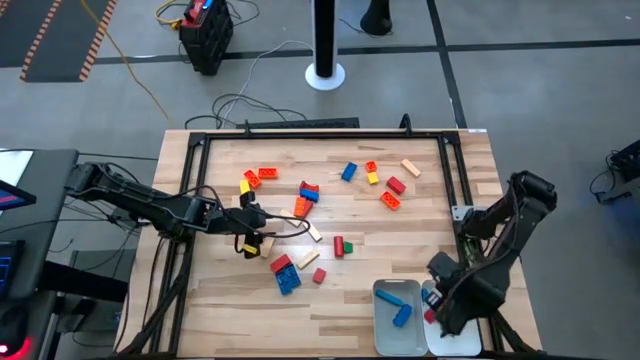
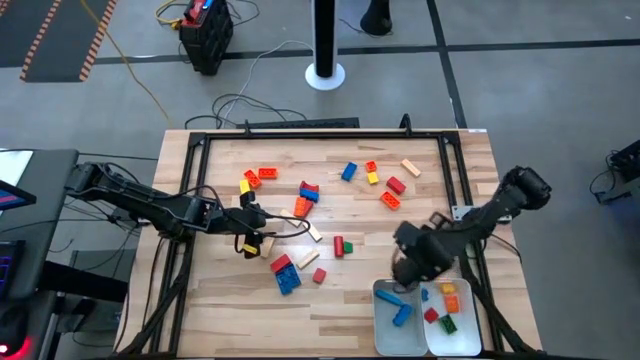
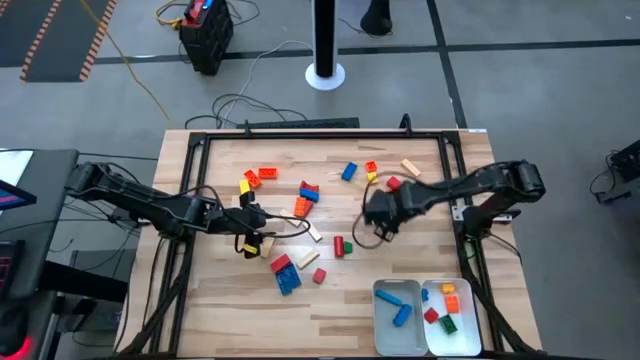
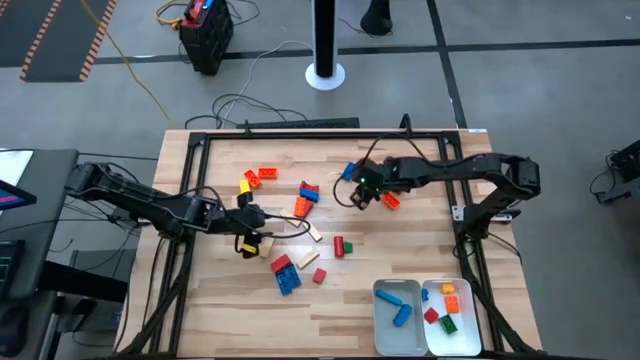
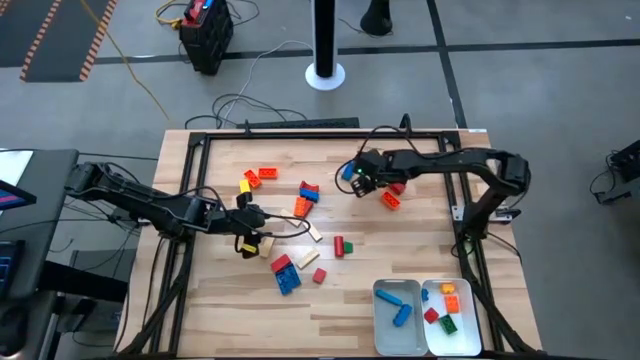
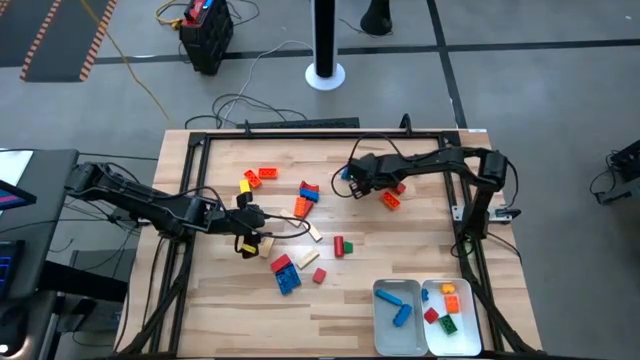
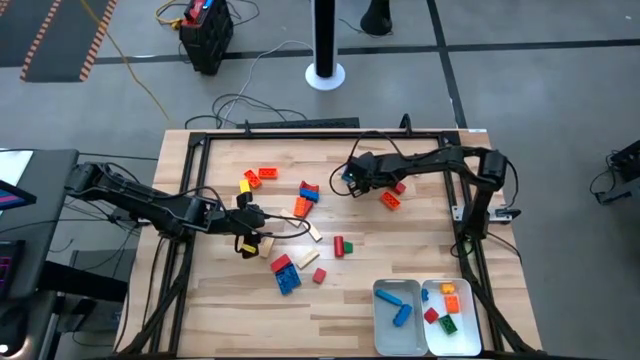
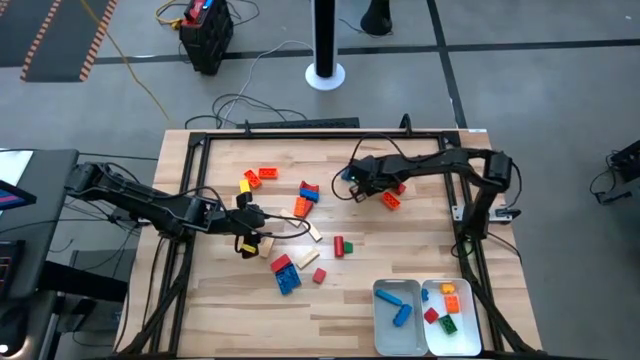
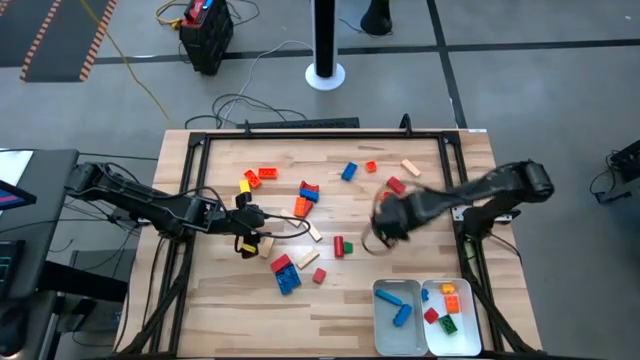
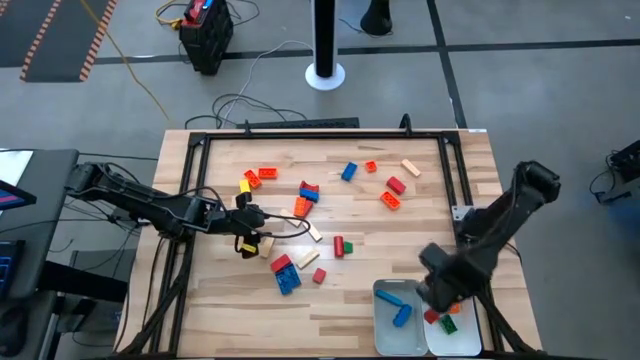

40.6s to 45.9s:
Task: Sort blocks by size
Put the small yellow wooden block into the white bin

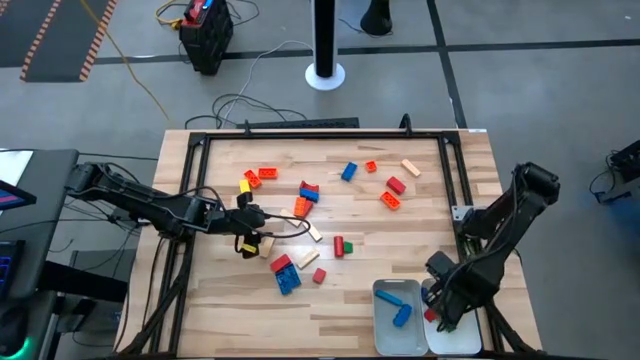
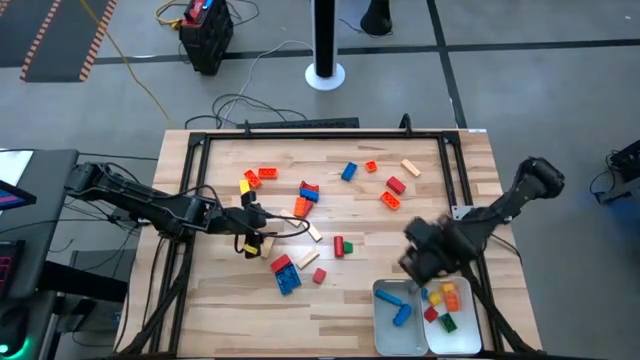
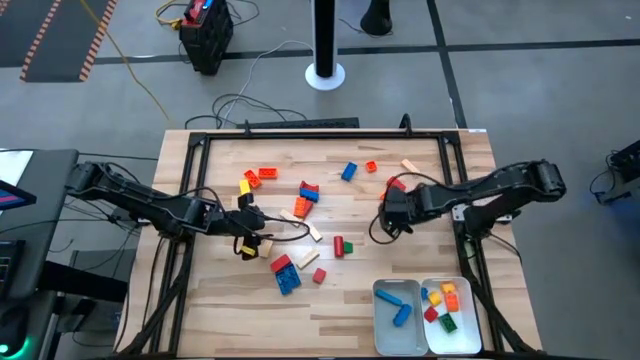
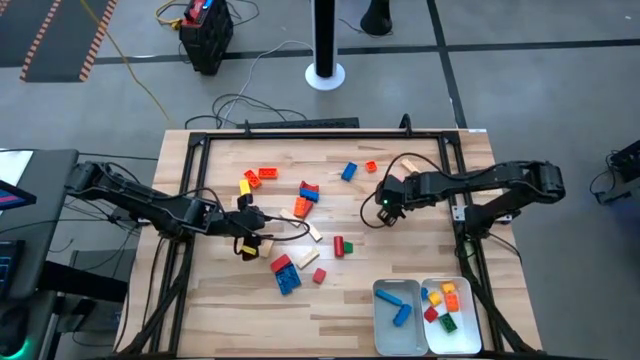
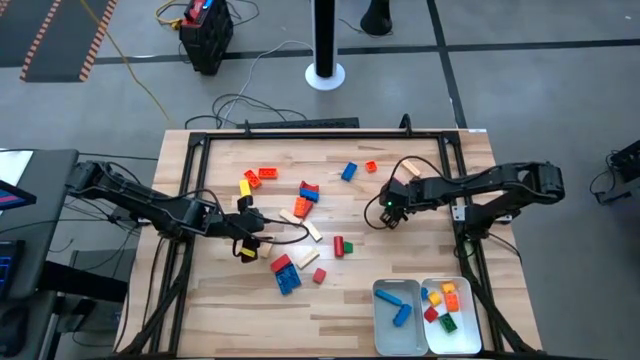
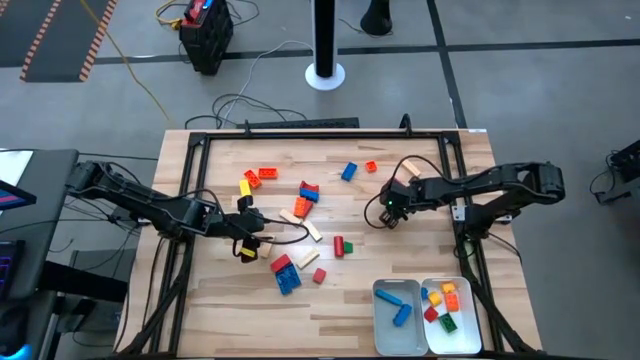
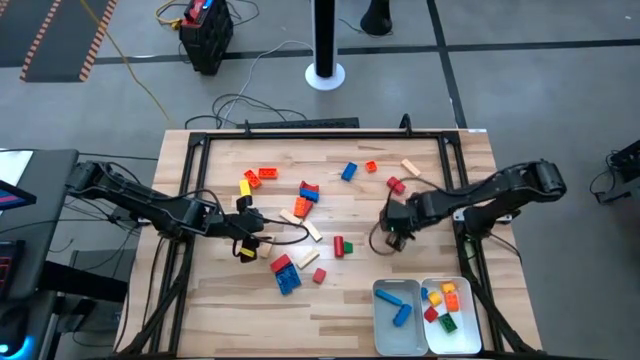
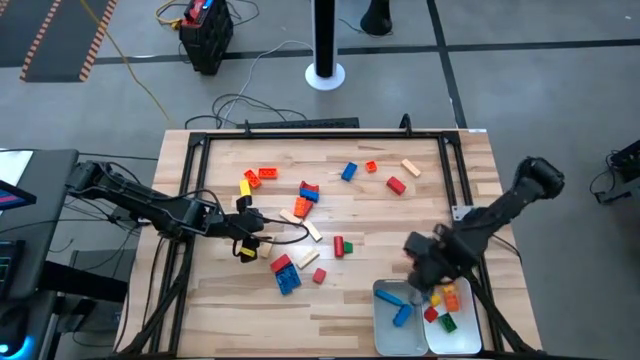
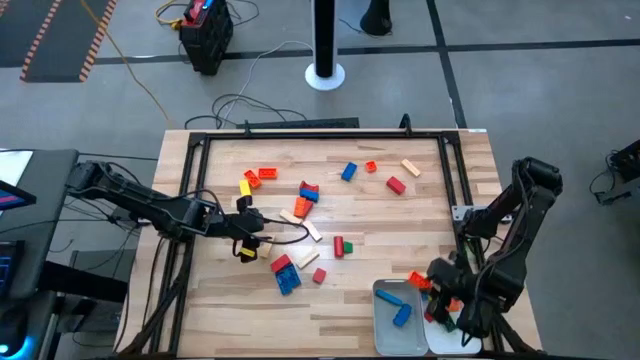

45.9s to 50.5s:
Put the large orange game piece into the gray bin

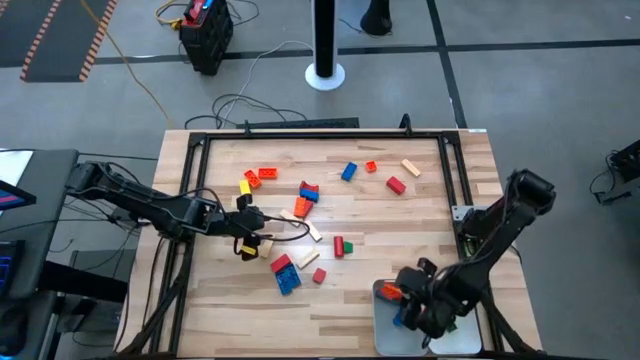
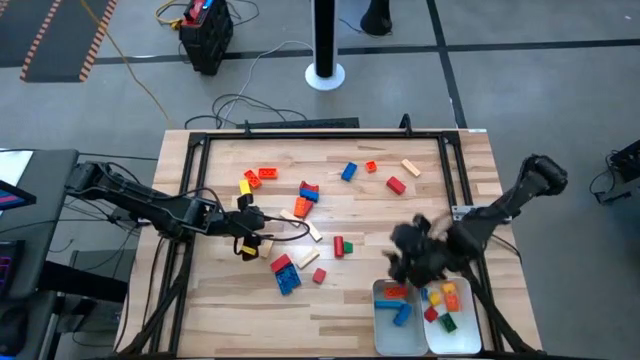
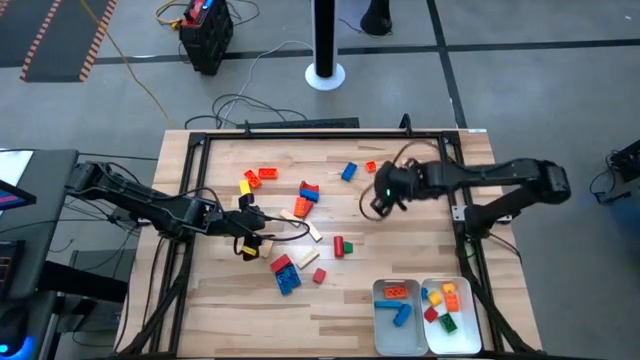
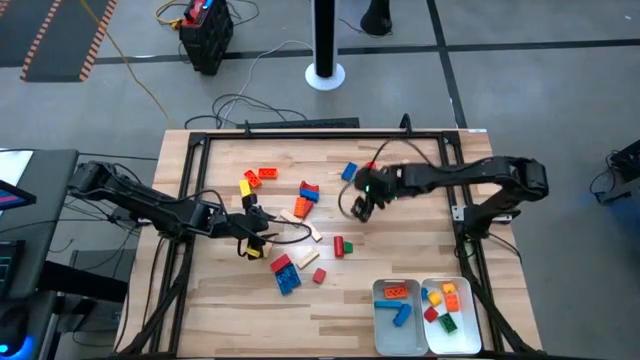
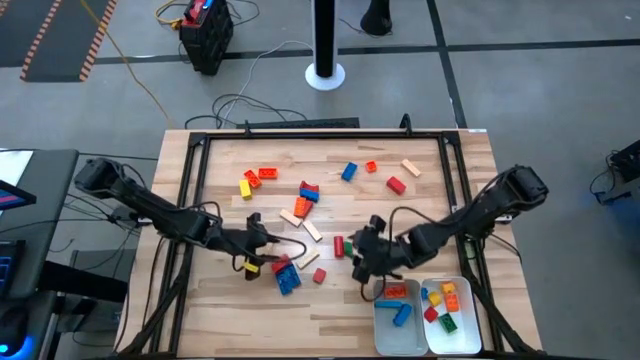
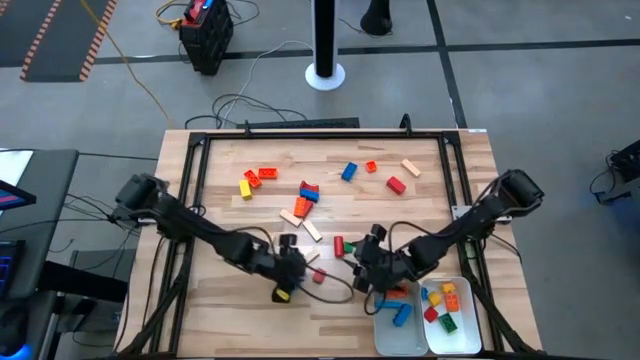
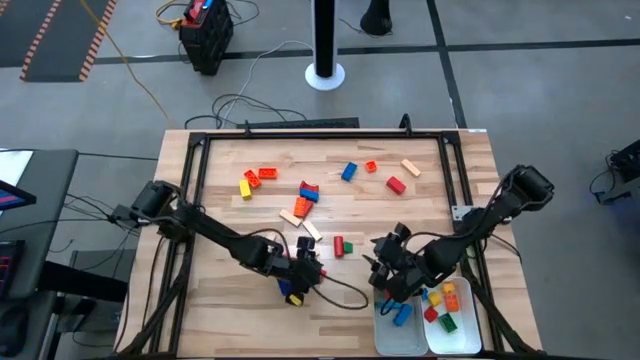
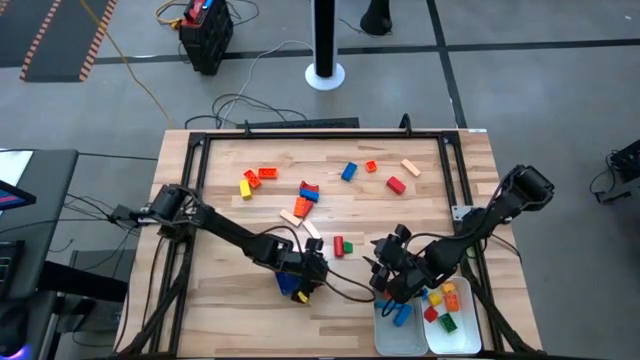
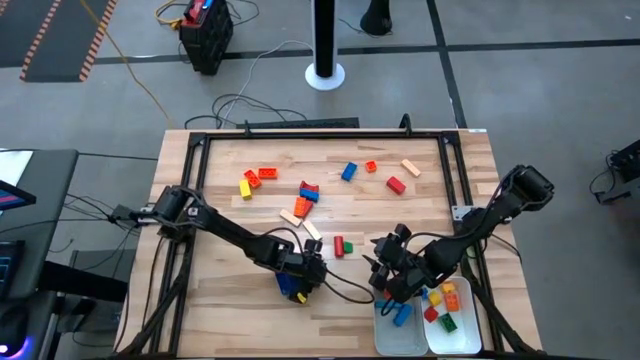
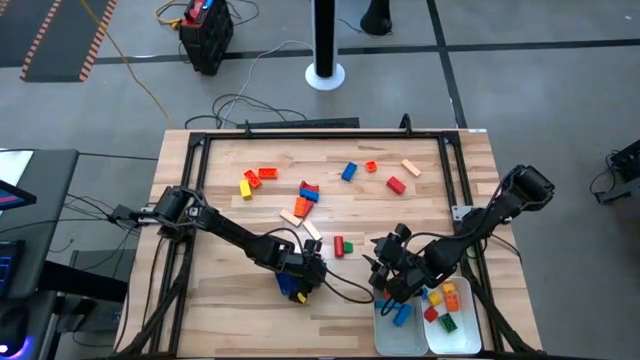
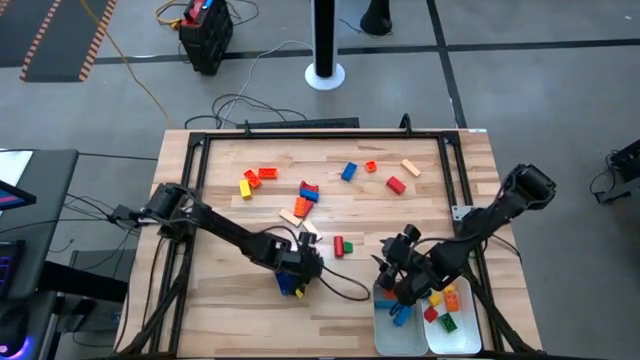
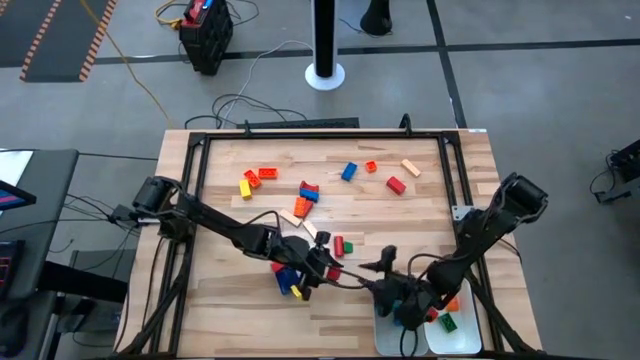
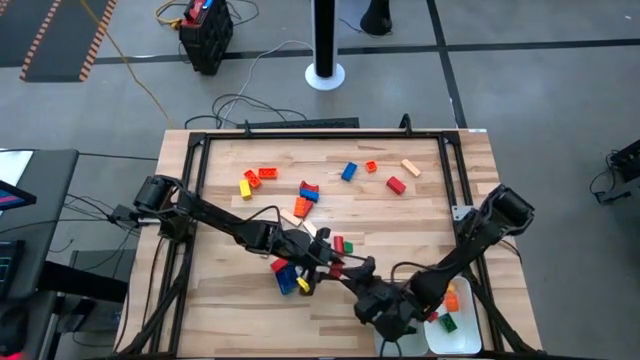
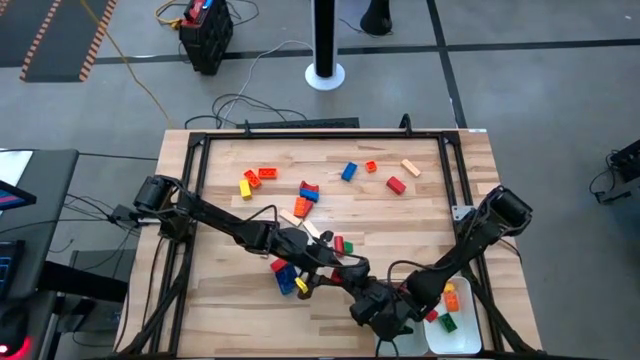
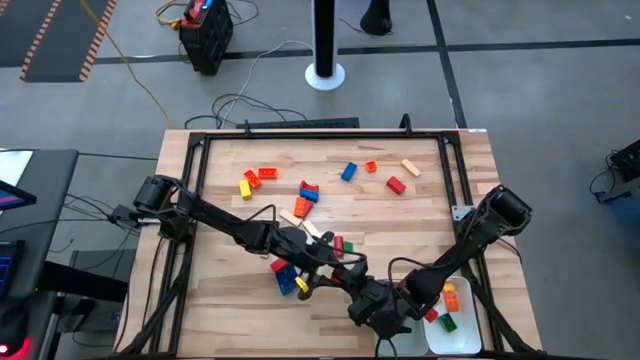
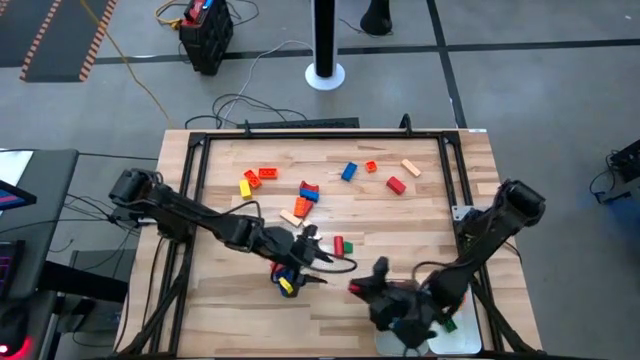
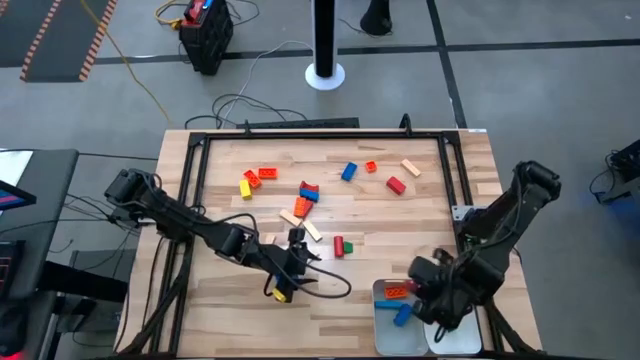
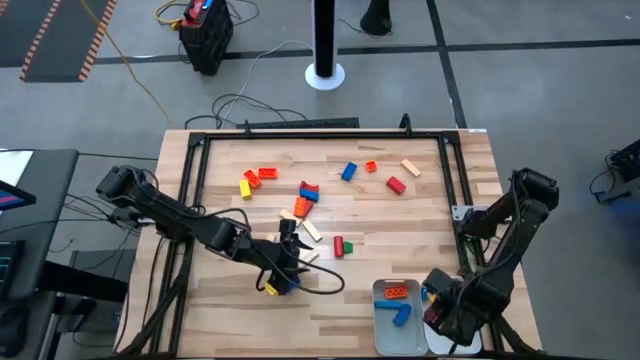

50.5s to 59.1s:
Put the small red wooden block into the white bin

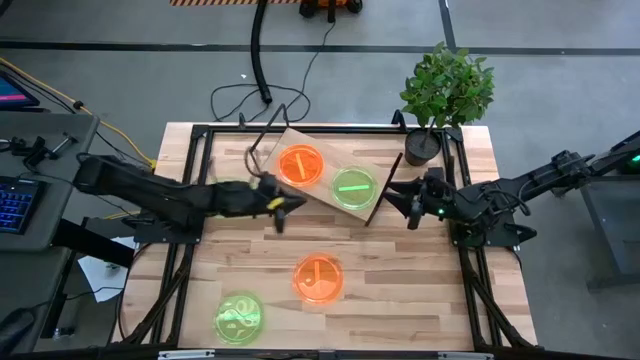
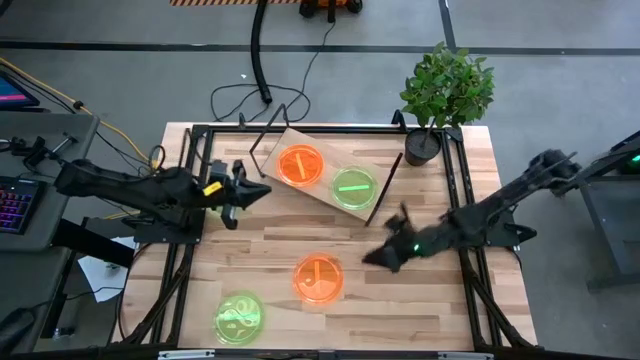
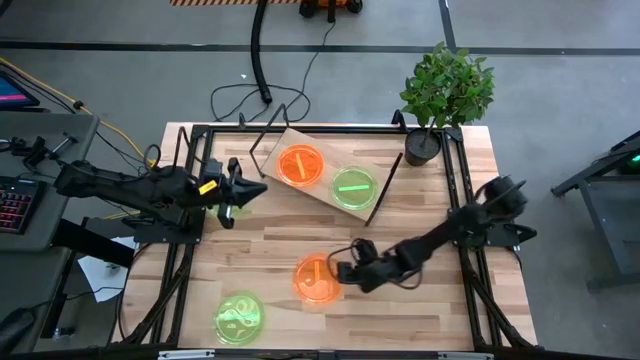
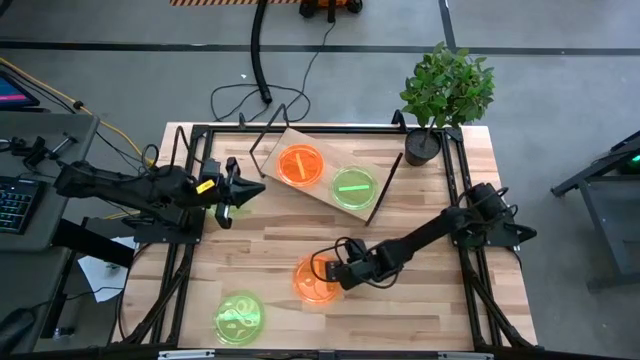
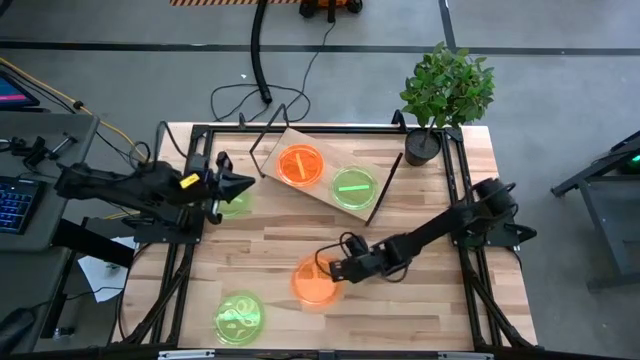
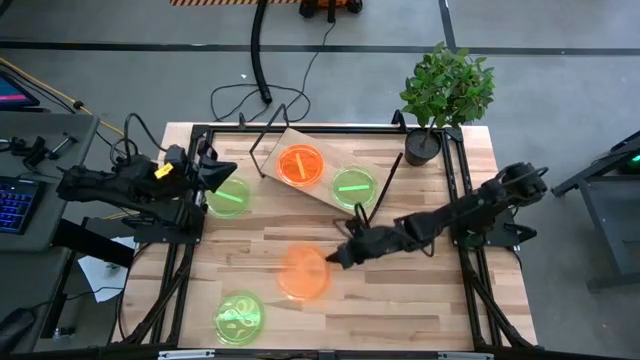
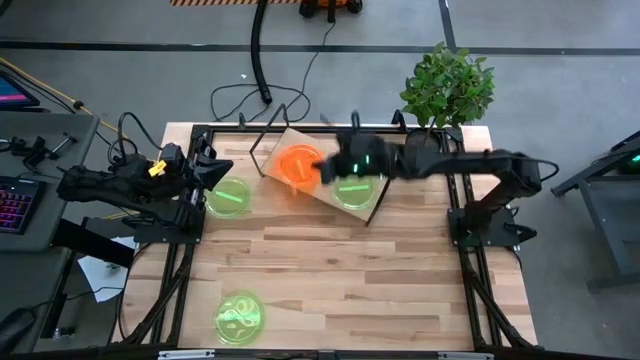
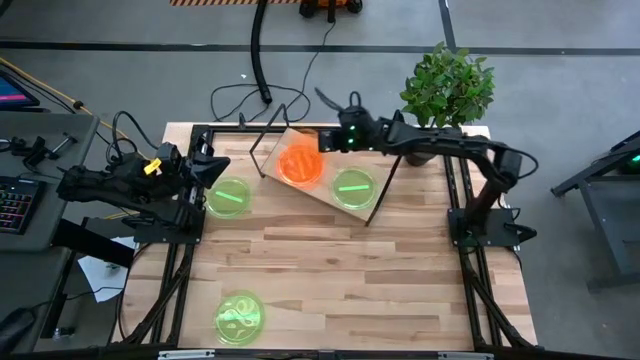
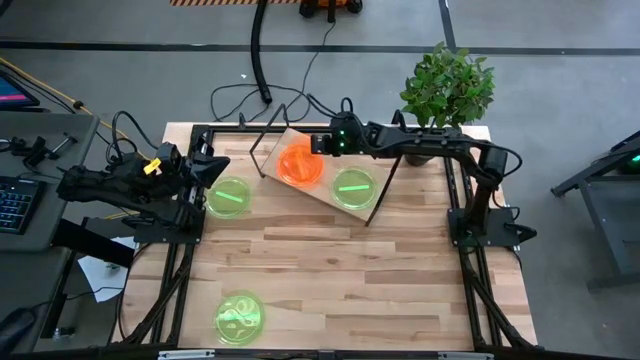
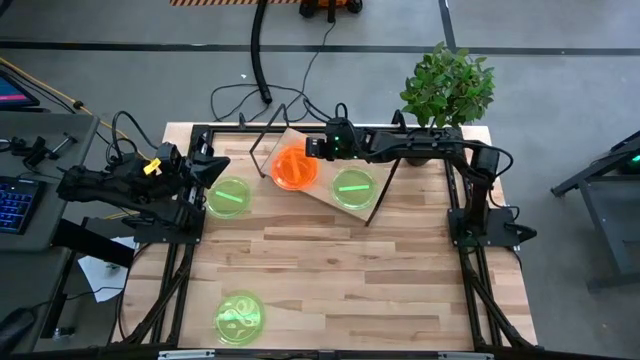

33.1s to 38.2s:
Task: Place and stack plates onto a shelf
Stack the orange plate on top of the orange plate on the shelf
